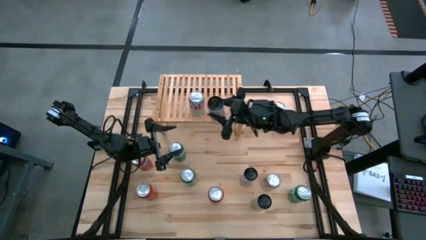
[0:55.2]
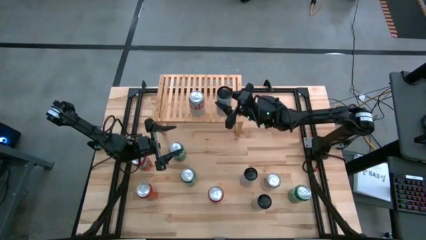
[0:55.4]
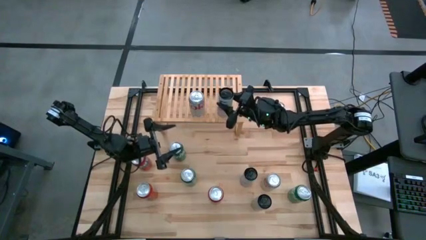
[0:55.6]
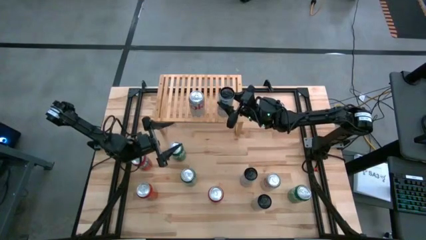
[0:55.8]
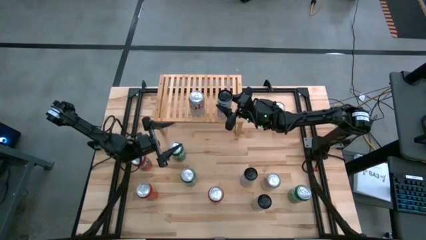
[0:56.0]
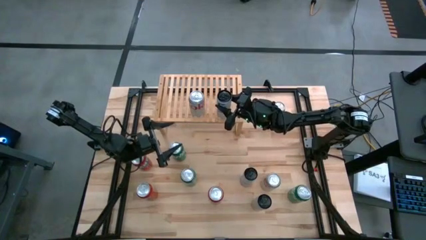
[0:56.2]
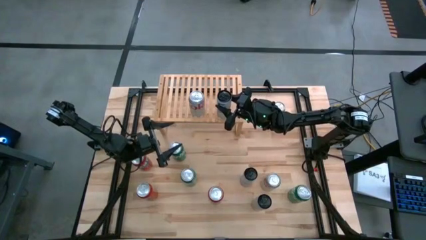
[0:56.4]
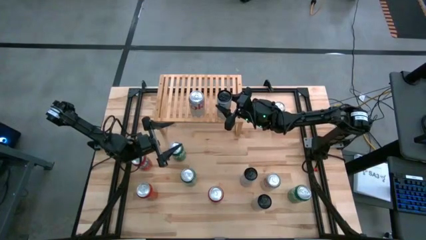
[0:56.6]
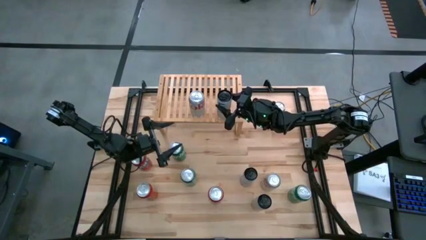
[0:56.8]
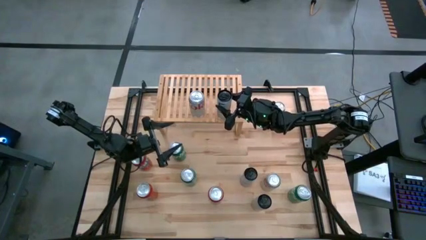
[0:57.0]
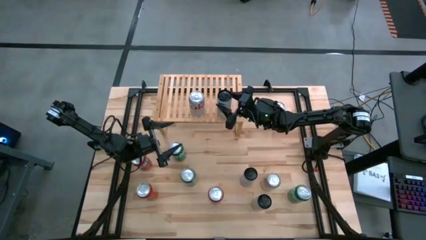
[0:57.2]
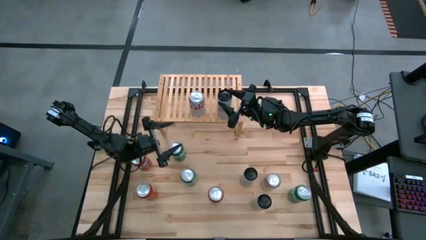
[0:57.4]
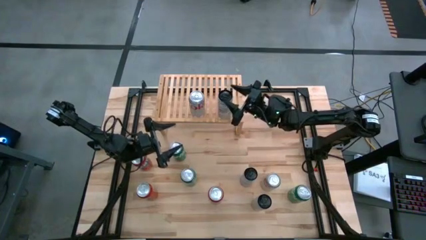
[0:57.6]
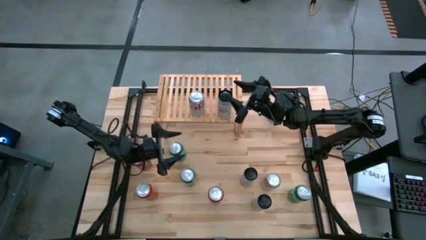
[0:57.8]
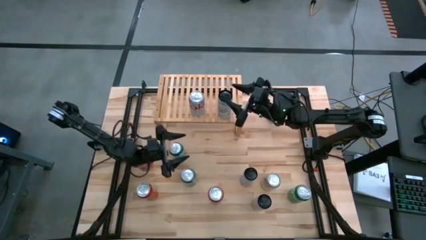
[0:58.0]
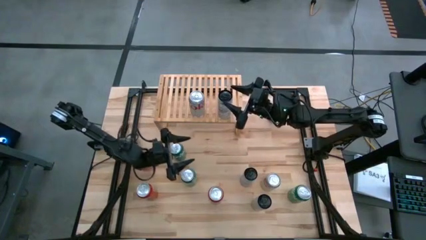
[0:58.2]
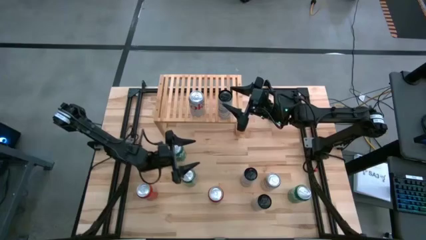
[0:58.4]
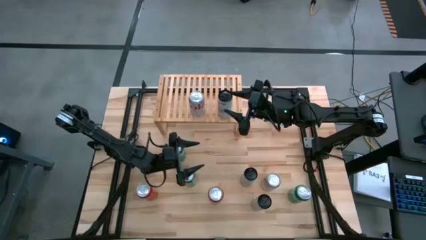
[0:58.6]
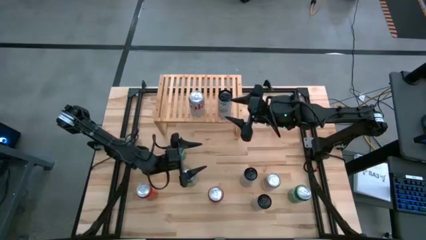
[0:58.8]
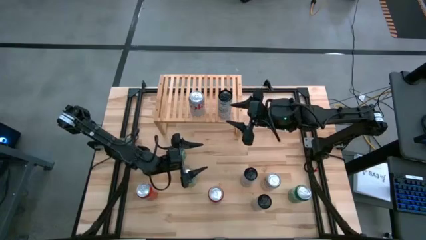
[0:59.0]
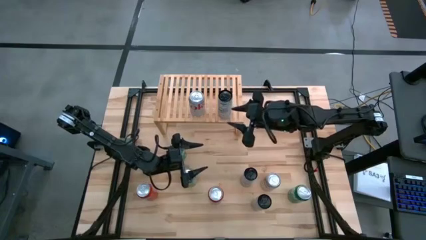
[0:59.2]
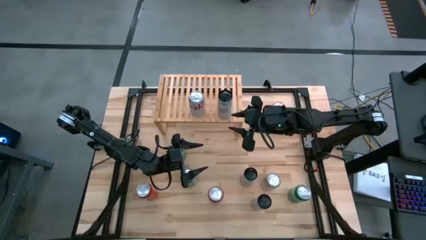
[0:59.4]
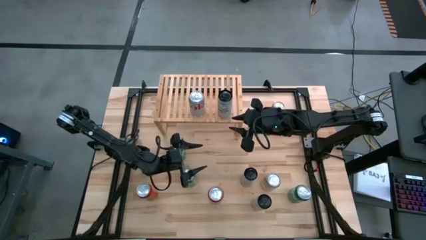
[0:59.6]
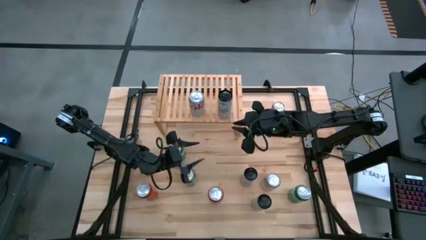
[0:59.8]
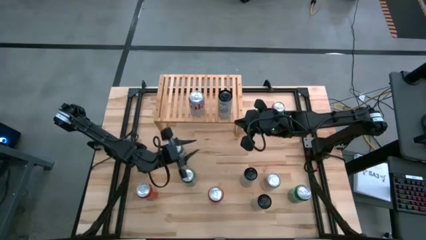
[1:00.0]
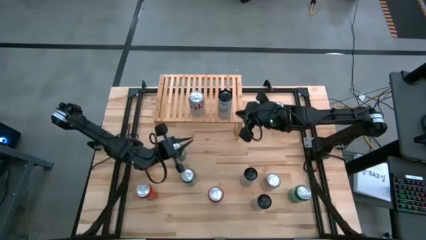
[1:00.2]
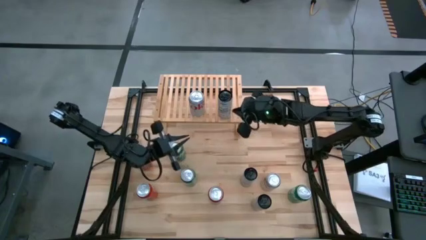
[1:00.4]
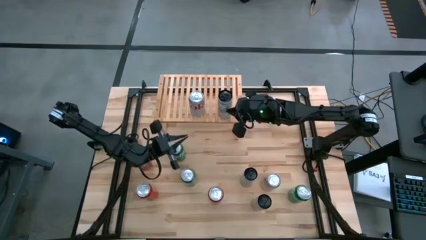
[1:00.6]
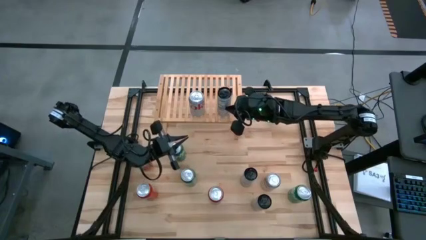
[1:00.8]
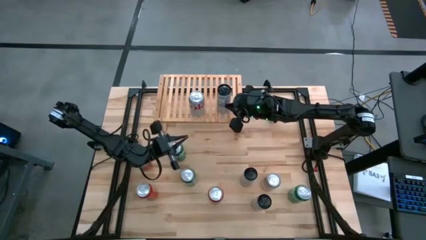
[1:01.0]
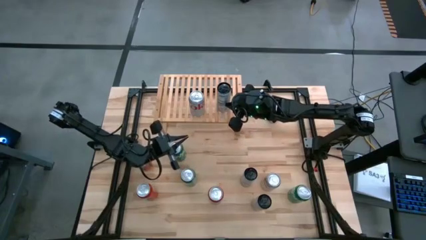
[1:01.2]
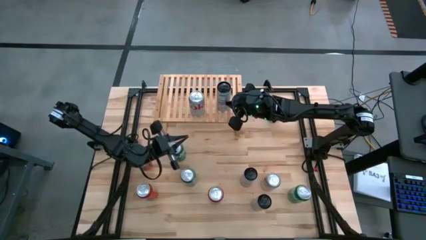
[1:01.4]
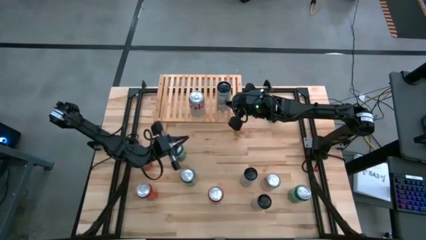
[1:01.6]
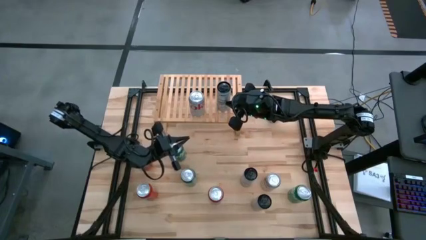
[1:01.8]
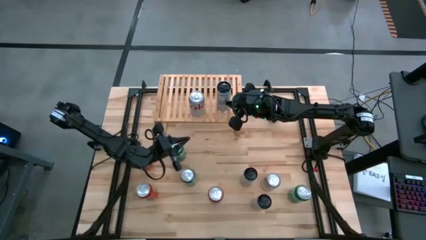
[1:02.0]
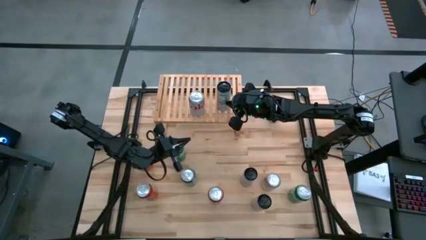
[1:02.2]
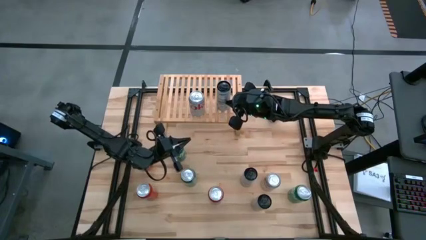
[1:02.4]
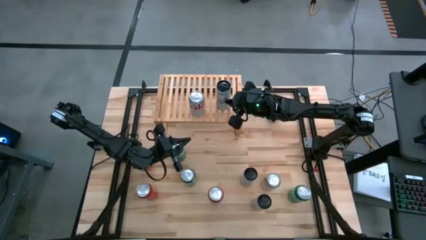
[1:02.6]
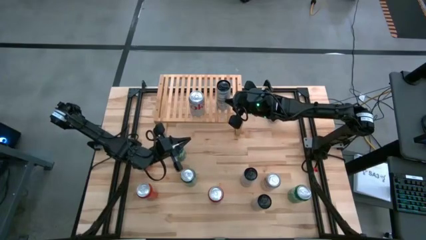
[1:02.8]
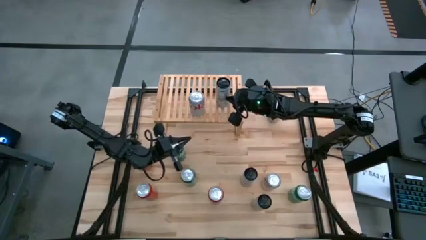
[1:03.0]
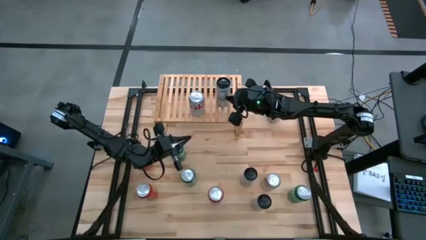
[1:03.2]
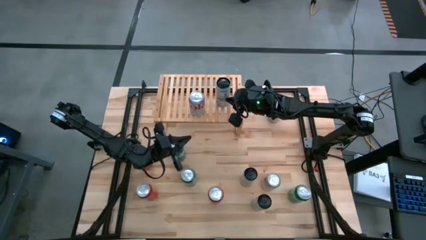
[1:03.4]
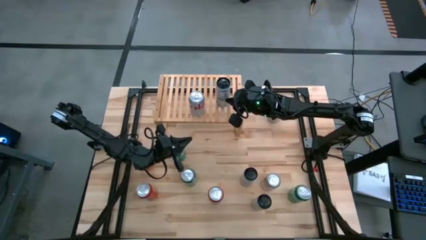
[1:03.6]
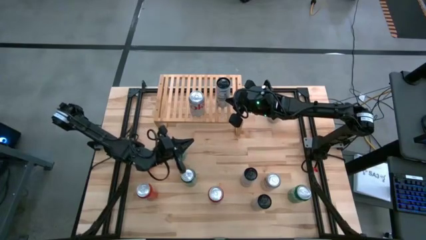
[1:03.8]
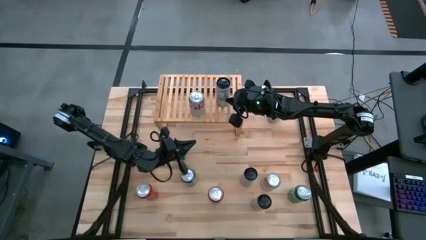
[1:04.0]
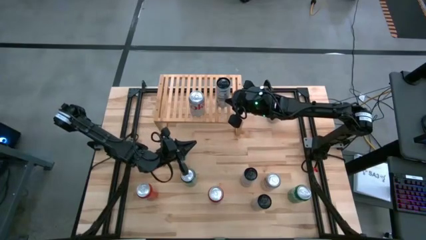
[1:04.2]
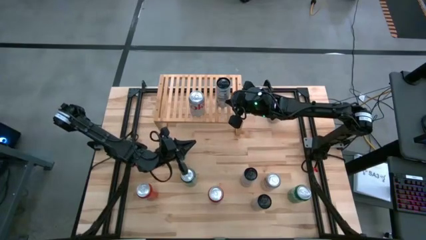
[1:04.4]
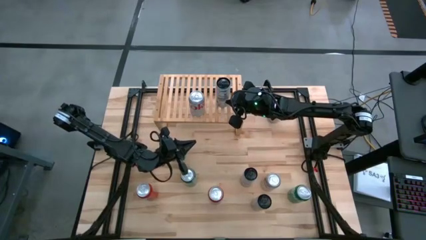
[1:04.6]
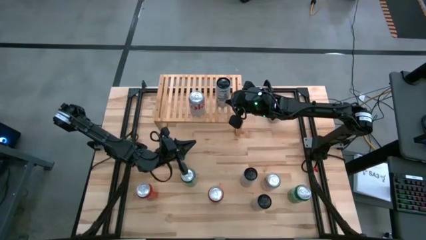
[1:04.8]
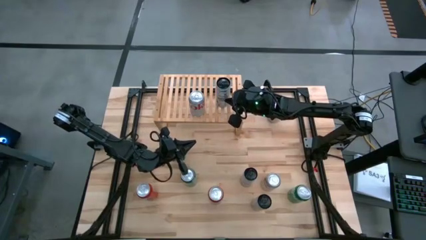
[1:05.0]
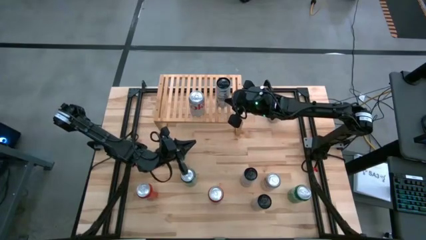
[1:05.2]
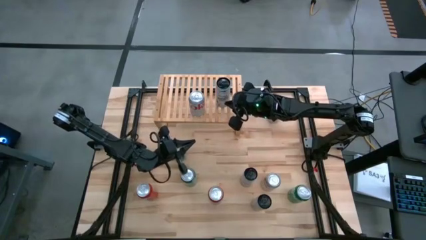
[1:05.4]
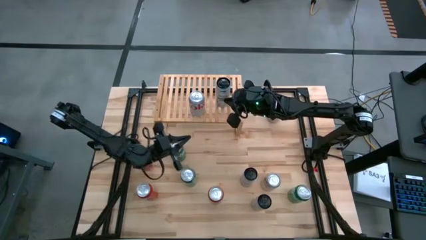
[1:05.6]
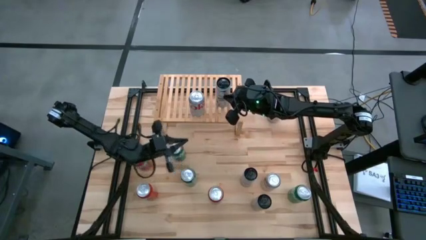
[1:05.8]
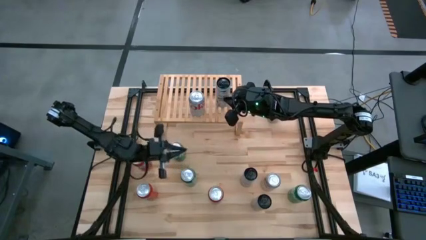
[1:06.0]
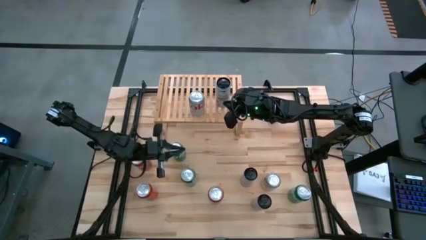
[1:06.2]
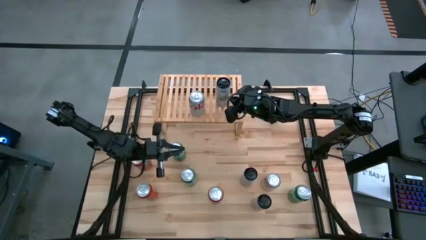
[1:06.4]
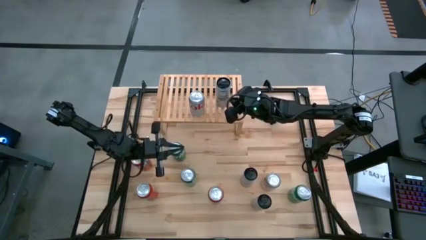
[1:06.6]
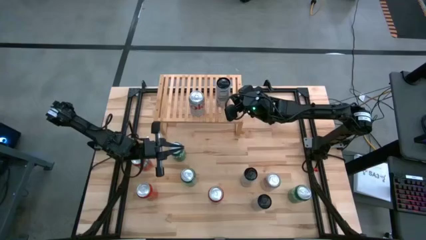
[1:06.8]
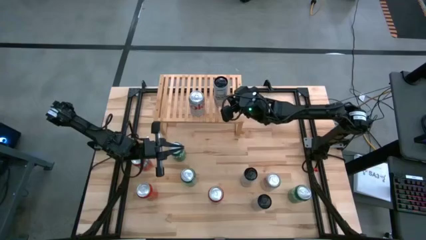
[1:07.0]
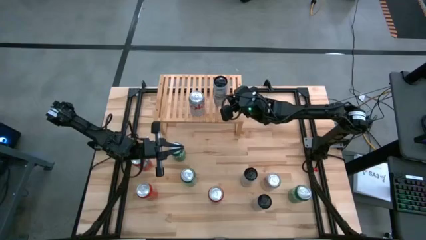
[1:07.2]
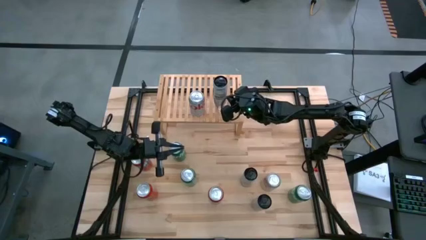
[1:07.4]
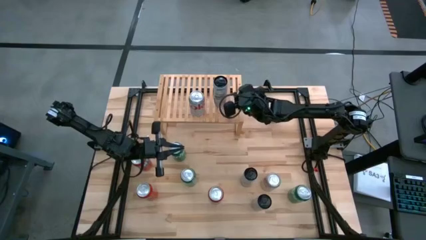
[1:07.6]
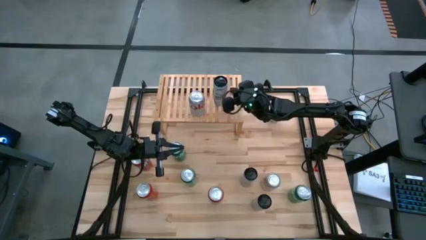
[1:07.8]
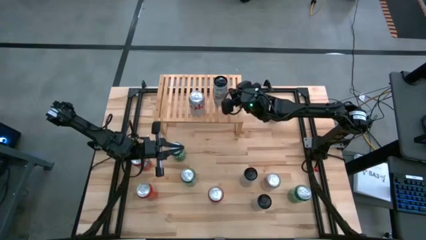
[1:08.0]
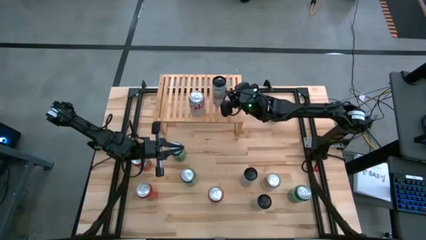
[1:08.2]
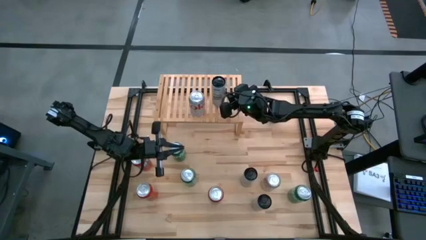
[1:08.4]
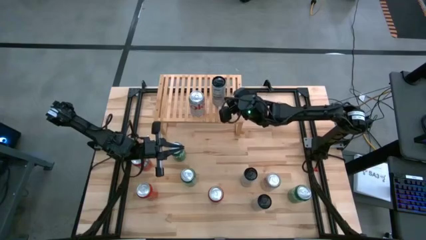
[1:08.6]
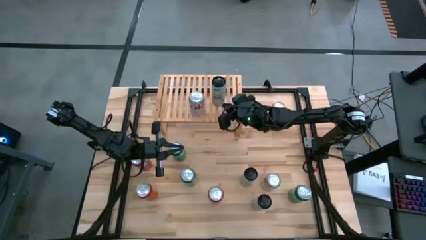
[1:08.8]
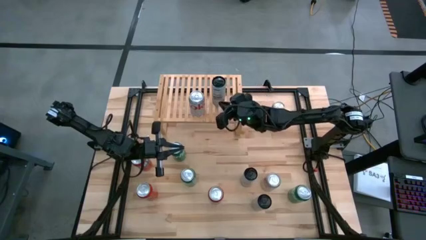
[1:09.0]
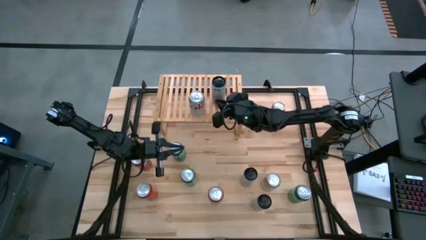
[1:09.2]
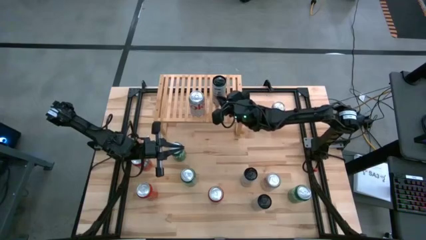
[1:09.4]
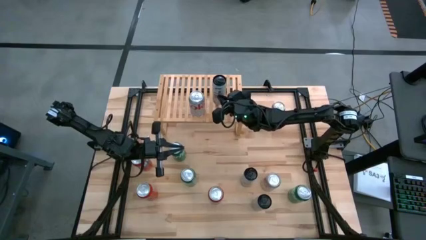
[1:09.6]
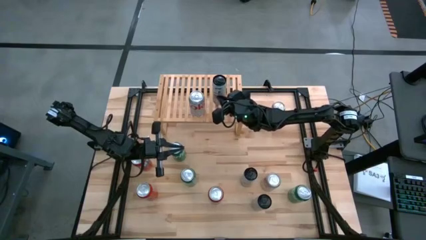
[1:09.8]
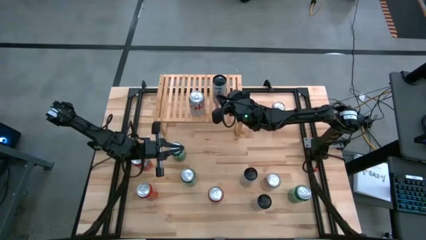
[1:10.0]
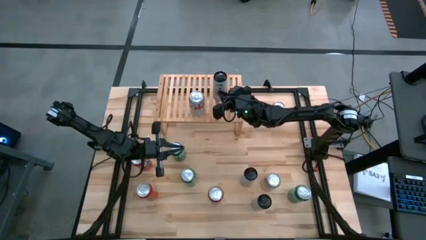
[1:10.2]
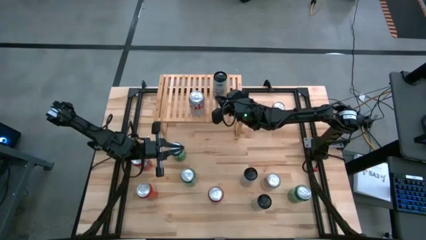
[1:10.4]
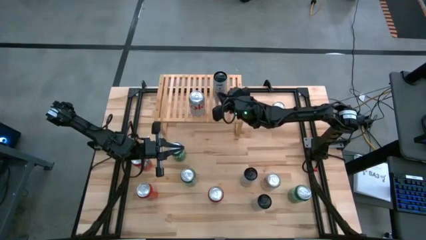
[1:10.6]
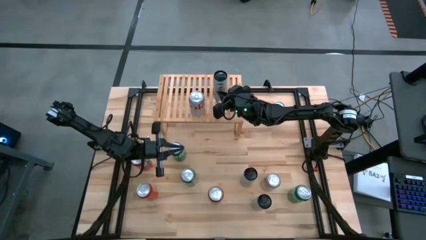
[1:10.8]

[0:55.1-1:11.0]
Task: Place canned beverage on shelf
Put the top blue soda can on the shelf
